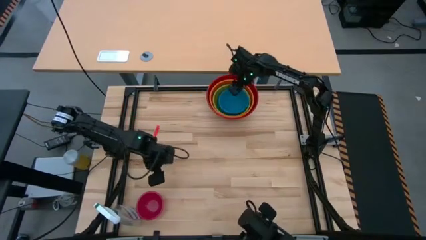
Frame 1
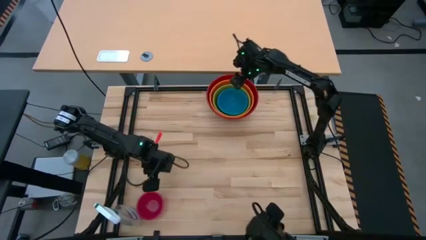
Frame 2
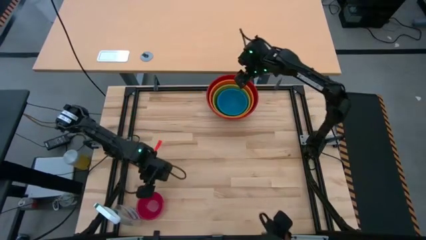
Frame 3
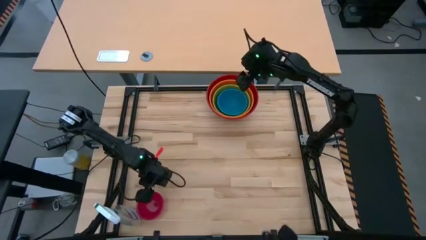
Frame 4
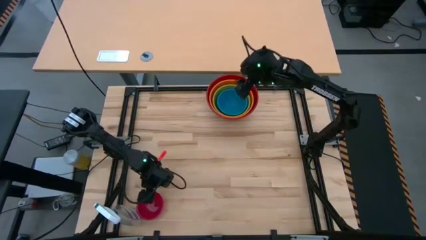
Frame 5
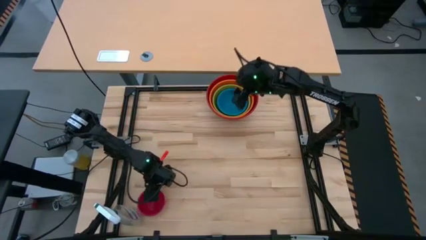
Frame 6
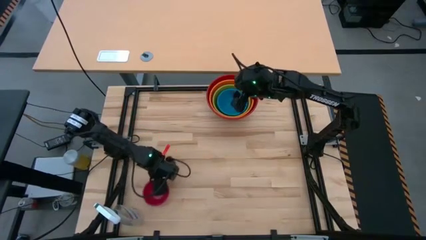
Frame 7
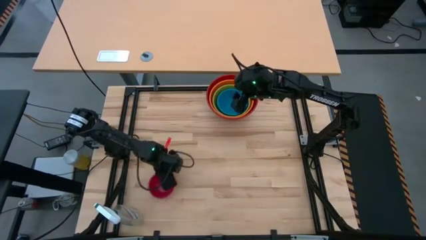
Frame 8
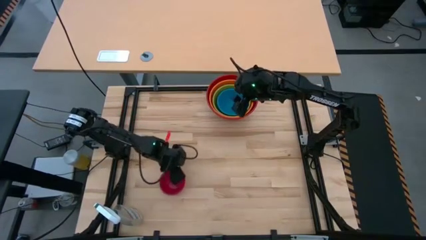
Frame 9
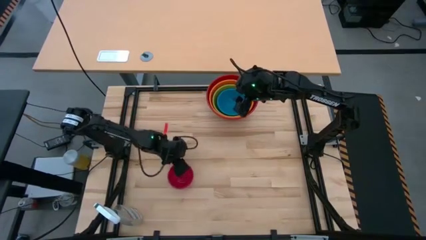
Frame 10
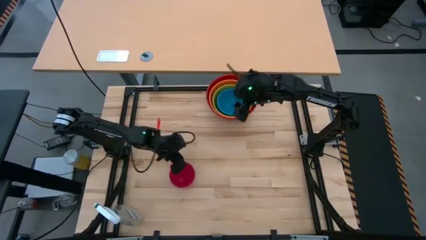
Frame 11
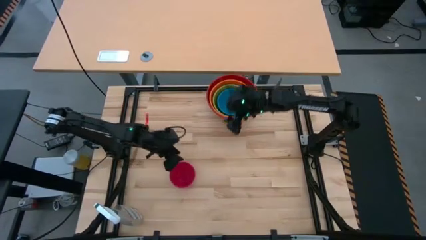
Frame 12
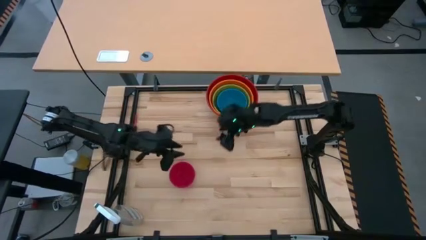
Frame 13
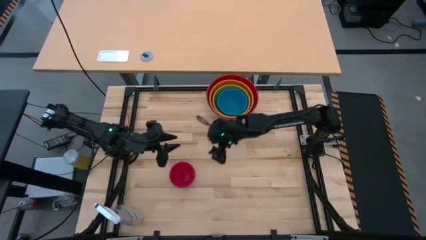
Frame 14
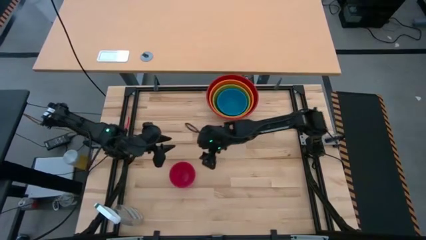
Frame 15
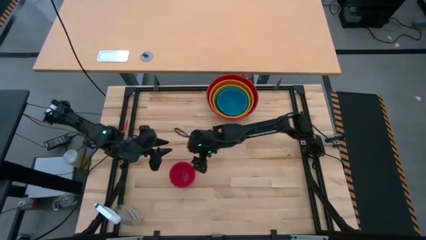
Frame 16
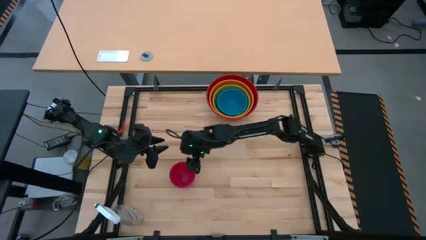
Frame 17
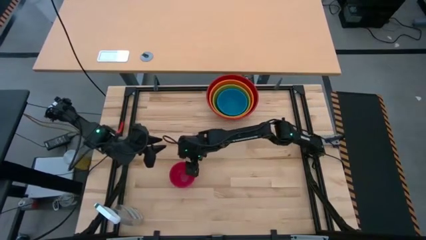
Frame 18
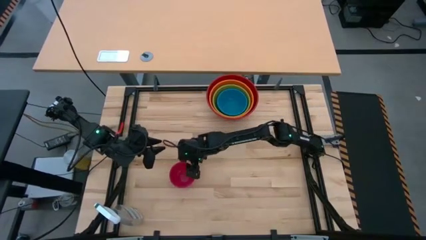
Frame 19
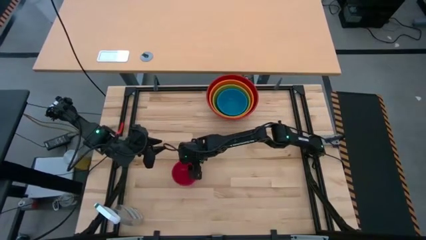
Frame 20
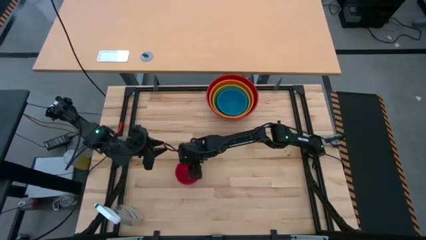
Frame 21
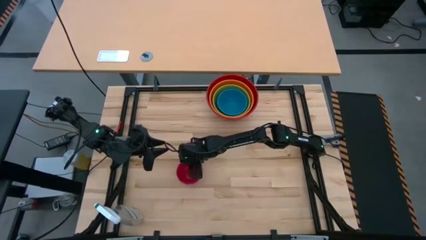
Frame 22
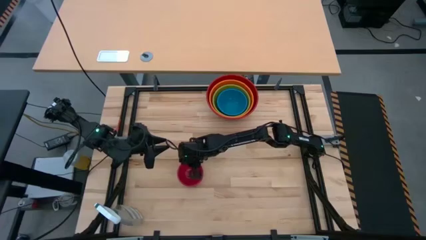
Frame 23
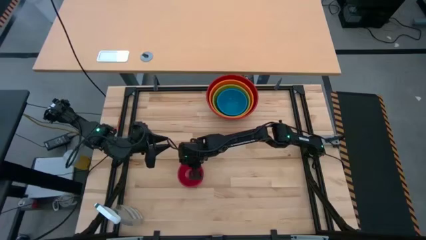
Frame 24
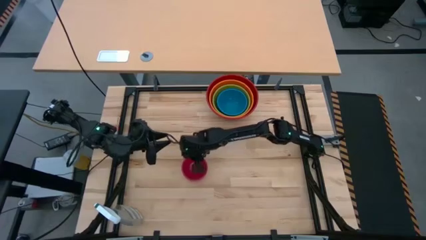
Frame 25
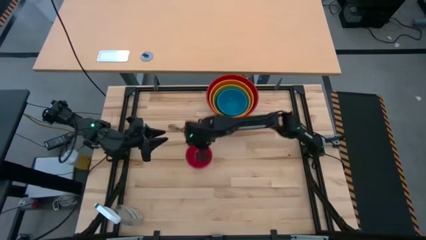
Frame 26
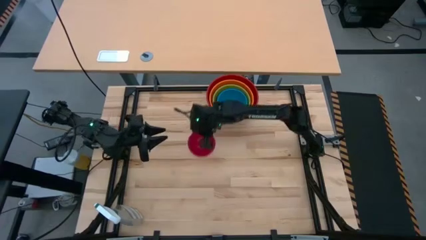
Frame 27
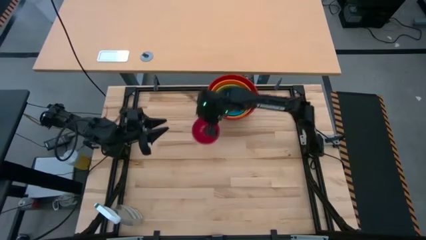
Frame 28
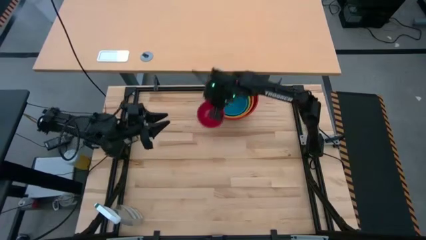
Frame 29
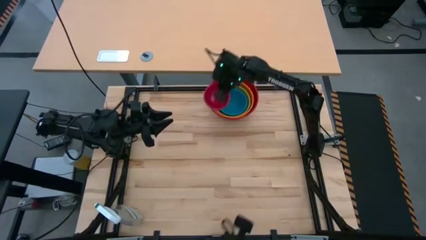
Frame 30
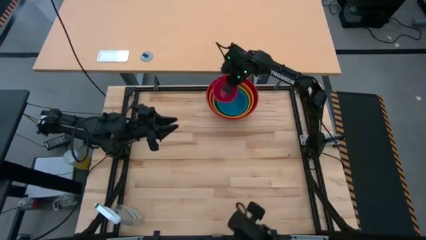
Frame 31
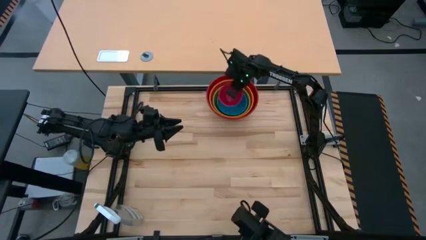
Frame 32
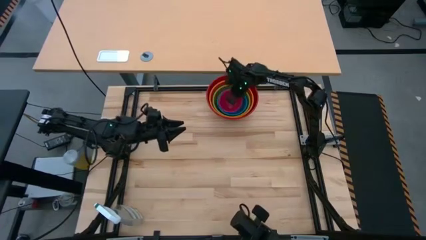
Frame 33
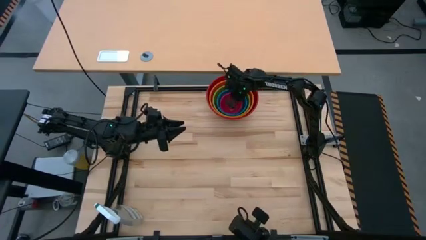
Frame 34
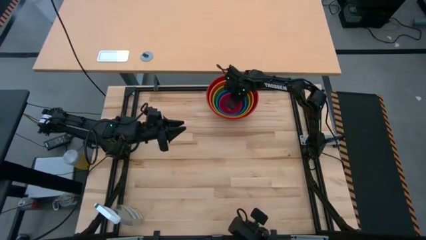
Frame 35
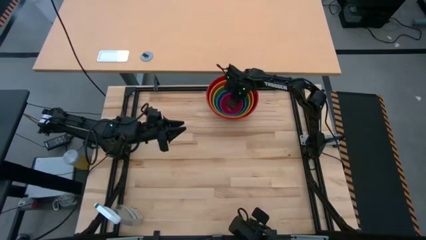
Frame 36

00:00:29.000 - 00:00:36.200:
Stack the pink bowl on top of the blue bowl

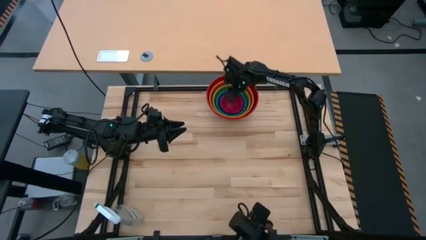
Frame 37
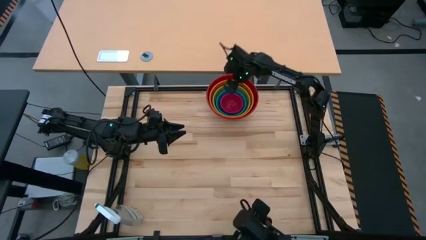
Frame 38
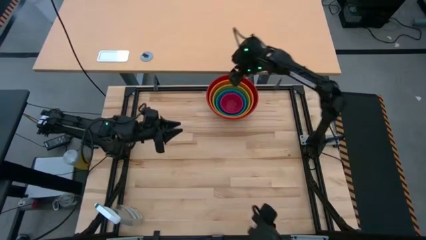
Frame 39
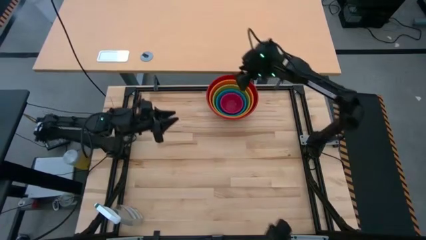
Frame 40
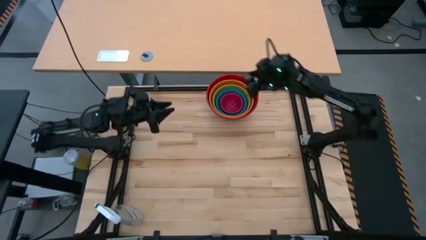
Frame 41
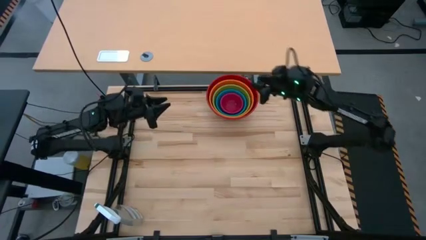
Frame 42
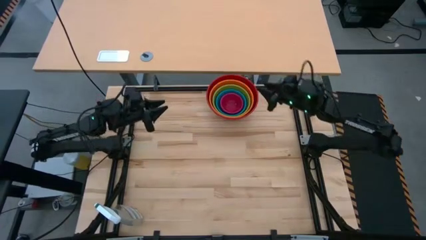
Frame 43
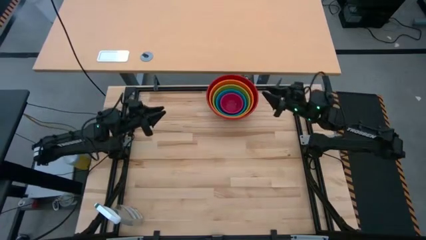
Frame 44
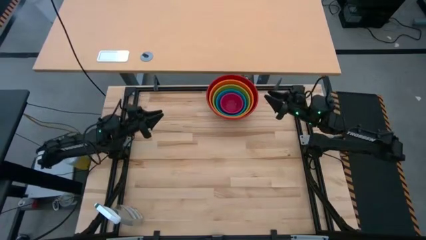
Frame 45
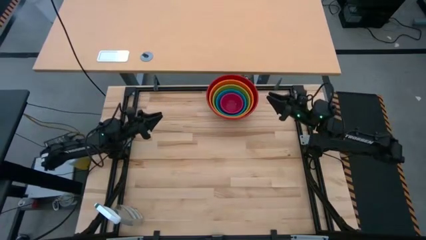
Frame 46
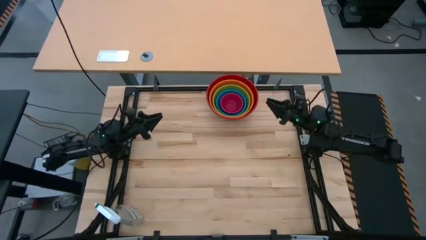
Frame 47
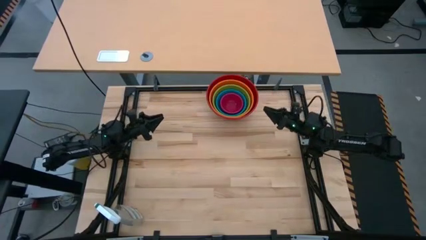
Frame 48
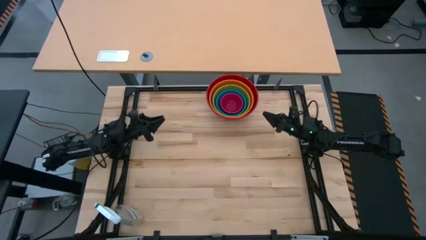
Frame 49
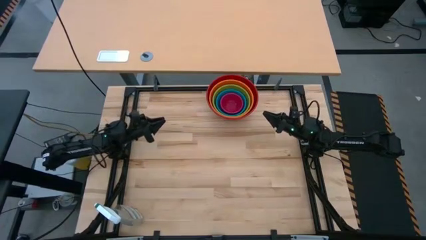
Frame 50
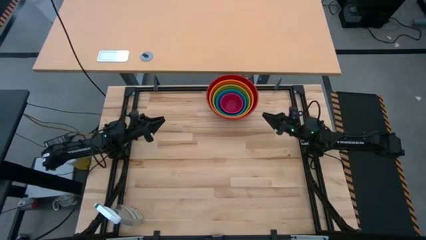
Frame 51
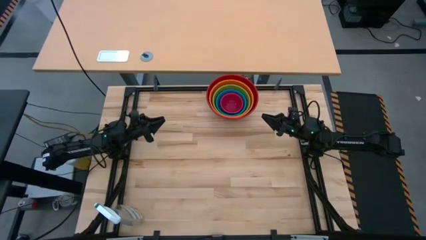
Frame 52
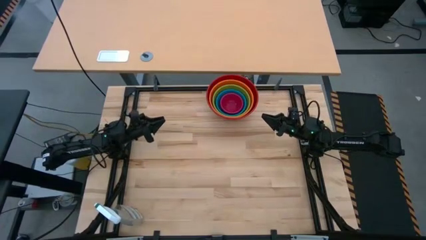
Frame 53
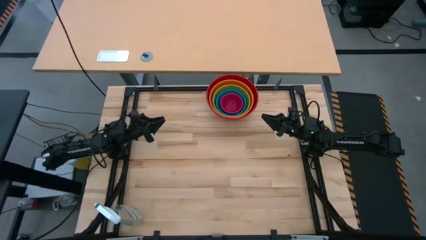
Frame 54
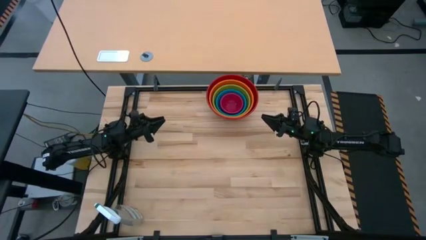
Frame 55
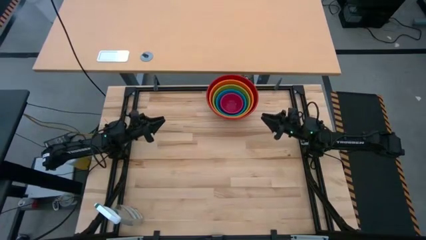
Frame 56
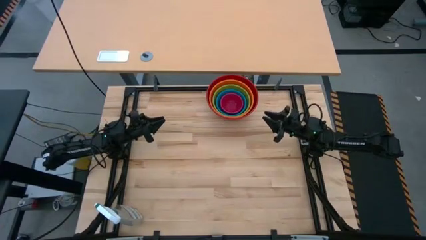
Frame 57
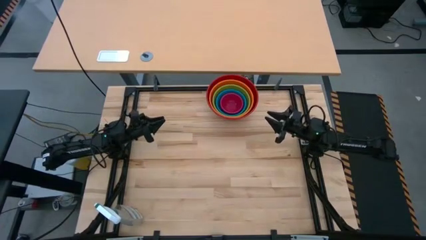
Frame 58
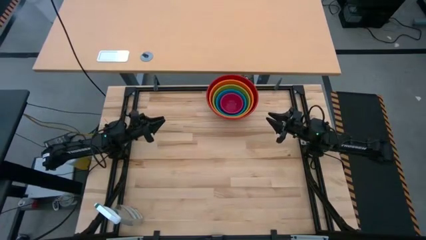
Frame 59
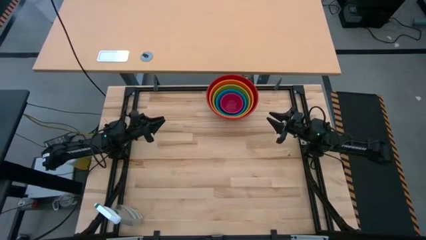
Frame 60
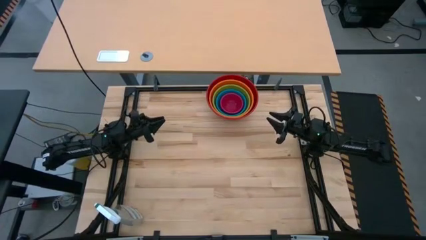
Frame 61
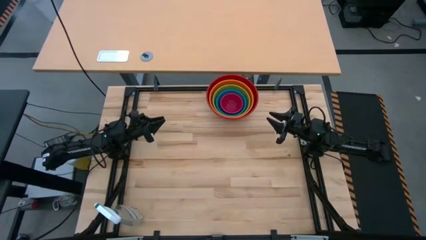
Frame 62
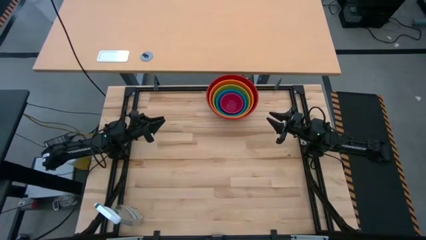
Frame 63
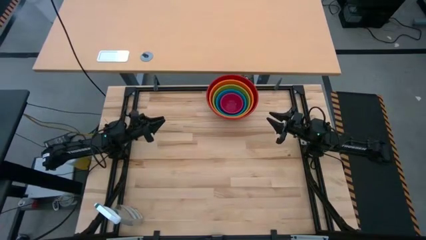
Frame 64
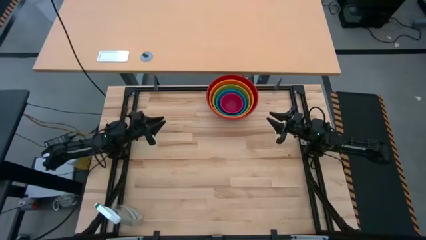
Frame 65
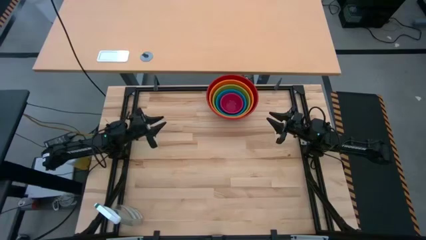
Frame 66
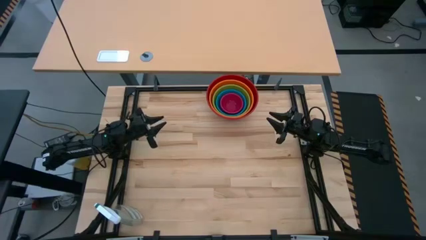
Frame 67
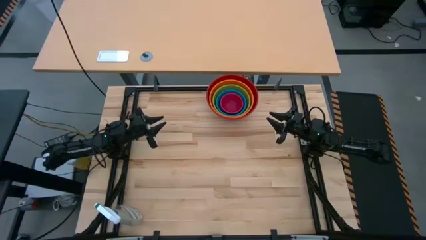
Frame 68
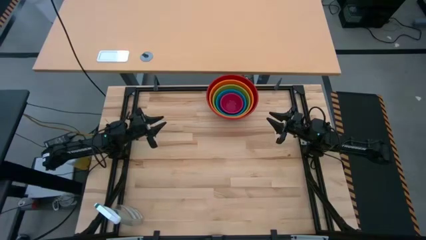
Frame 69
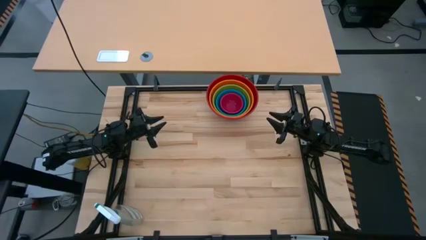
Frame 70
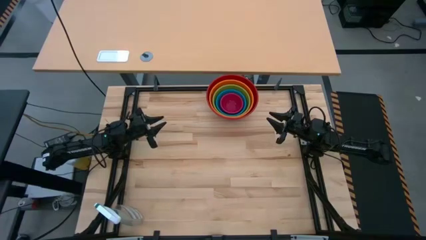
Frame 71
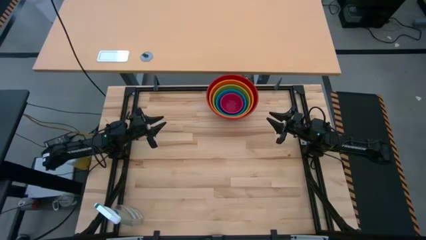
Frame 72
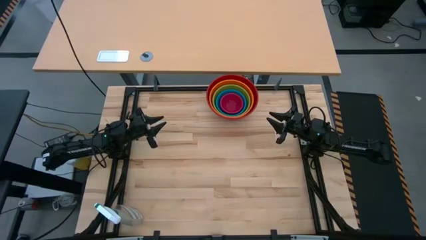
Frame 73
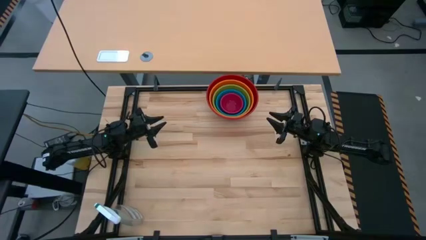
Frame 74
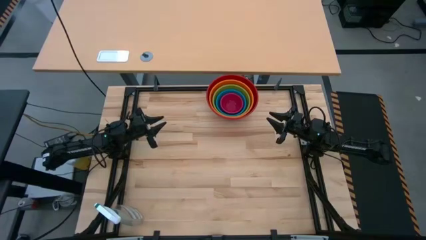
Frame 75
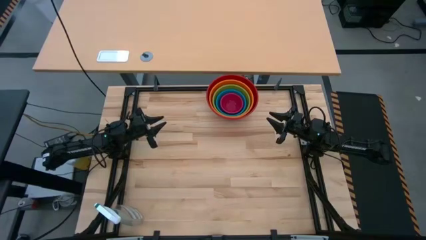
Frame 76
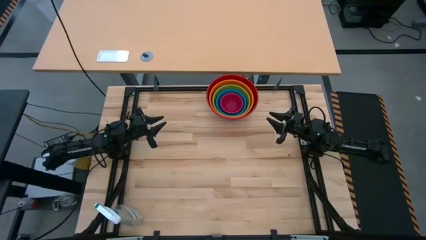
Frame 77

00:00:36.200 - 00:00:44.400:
Return to Home Position
